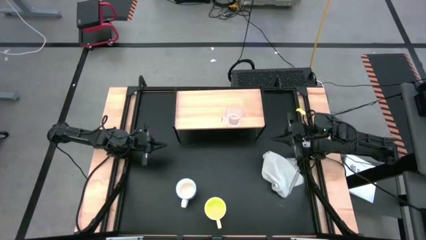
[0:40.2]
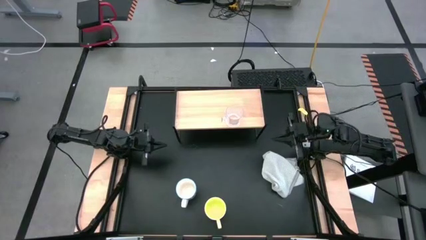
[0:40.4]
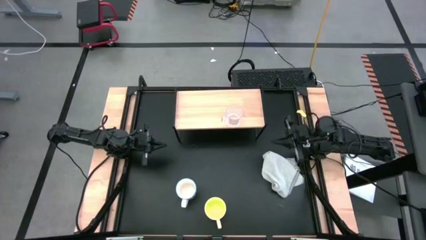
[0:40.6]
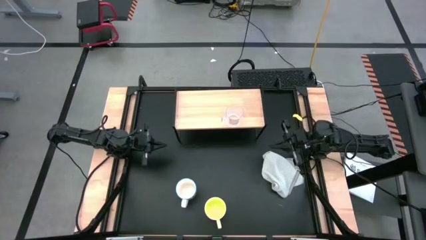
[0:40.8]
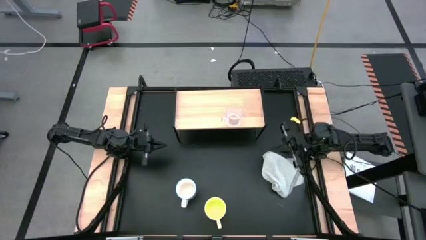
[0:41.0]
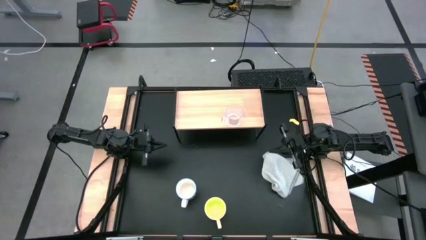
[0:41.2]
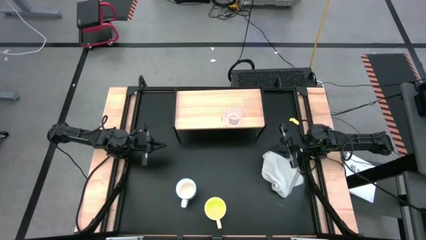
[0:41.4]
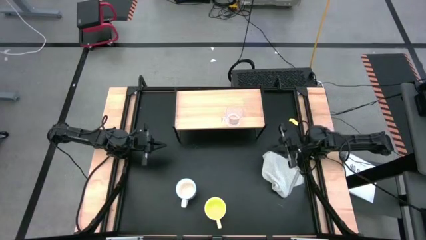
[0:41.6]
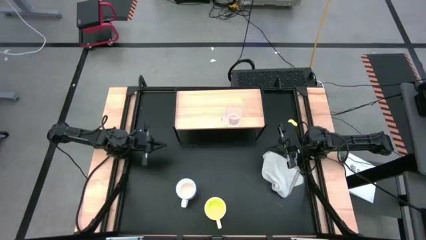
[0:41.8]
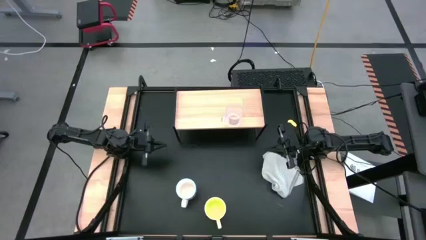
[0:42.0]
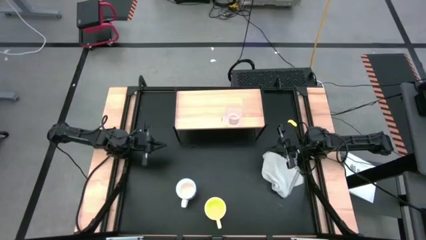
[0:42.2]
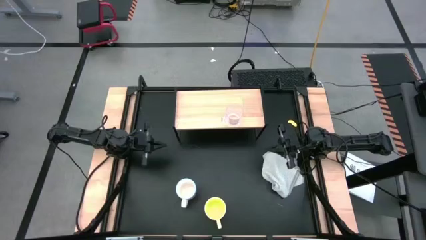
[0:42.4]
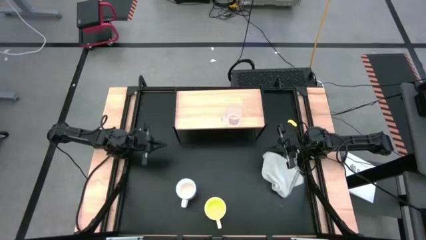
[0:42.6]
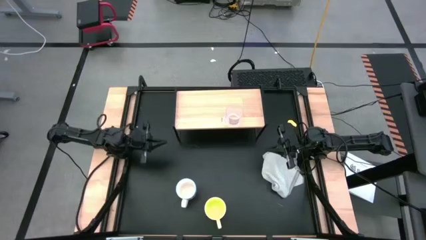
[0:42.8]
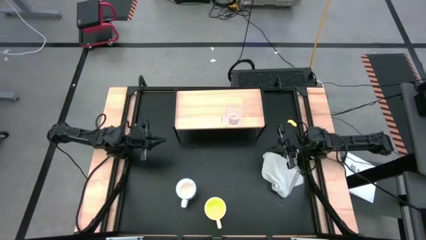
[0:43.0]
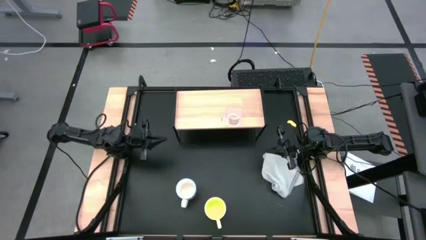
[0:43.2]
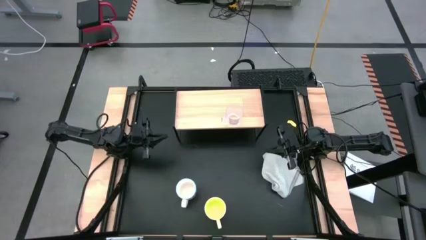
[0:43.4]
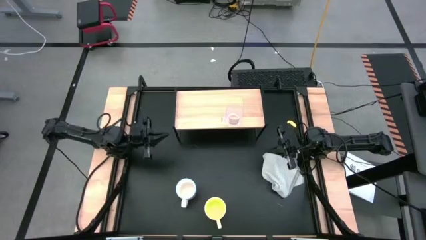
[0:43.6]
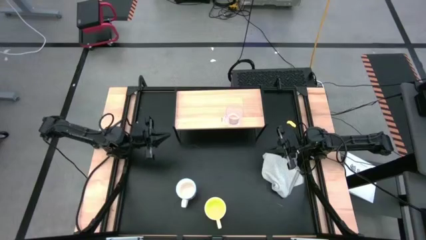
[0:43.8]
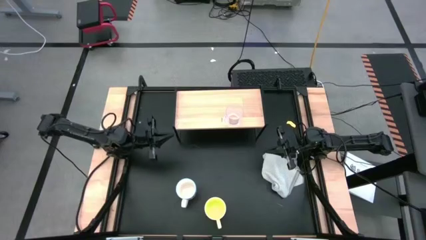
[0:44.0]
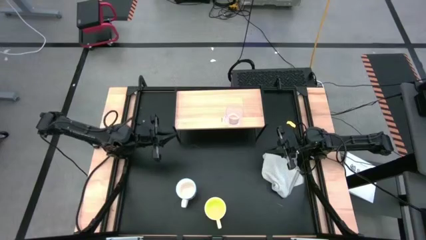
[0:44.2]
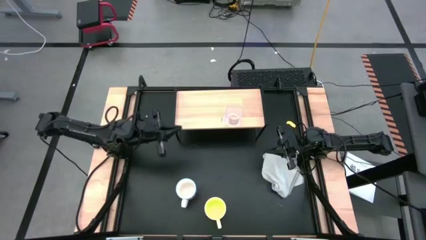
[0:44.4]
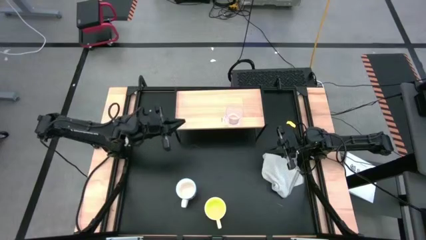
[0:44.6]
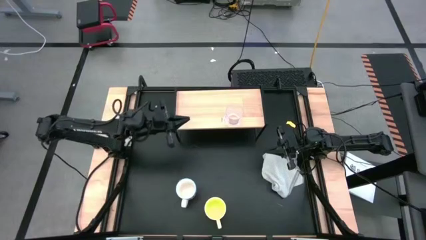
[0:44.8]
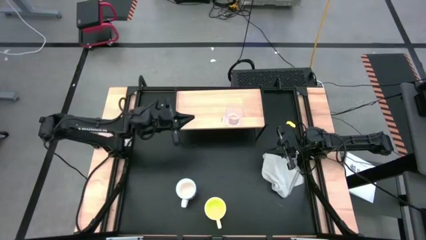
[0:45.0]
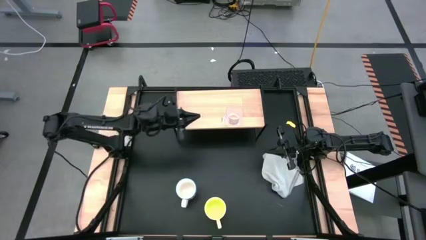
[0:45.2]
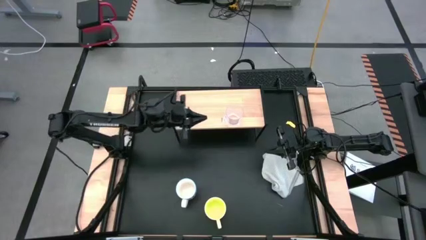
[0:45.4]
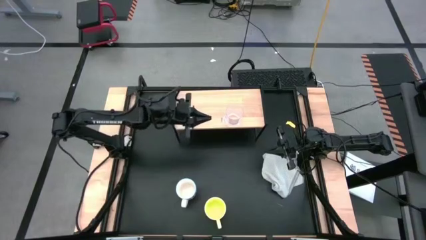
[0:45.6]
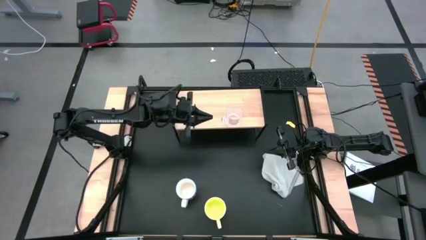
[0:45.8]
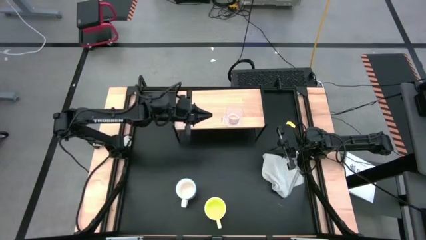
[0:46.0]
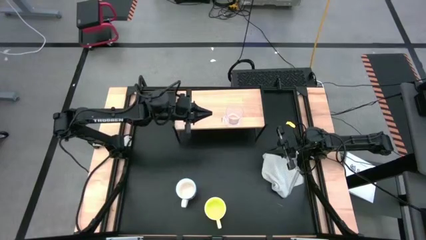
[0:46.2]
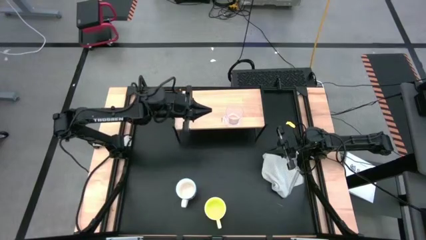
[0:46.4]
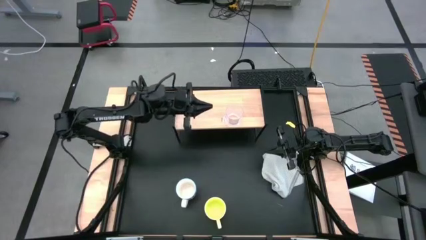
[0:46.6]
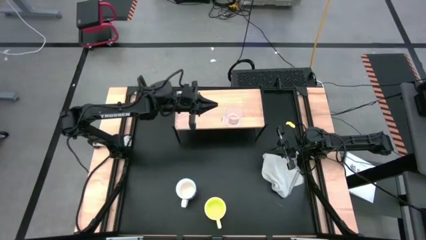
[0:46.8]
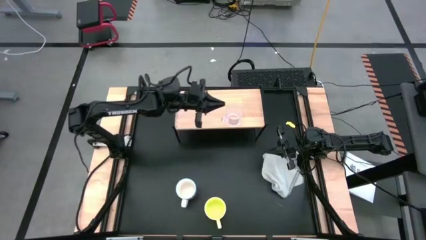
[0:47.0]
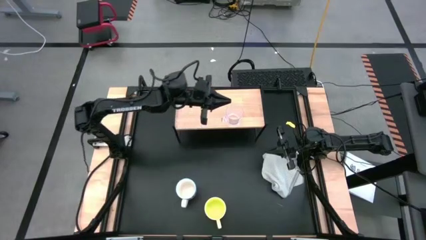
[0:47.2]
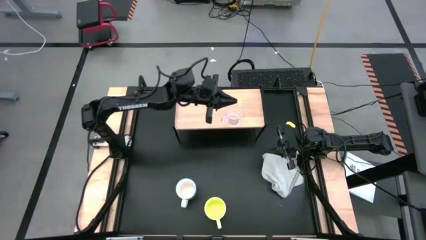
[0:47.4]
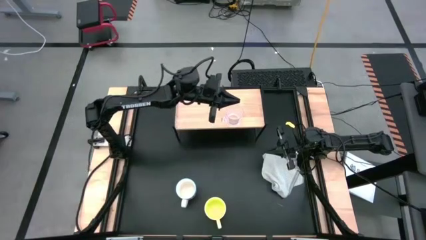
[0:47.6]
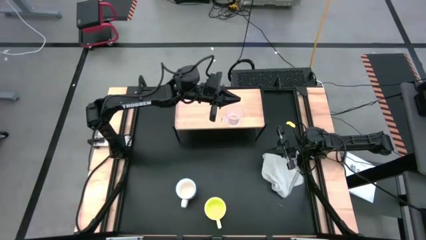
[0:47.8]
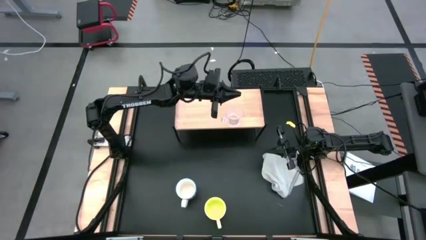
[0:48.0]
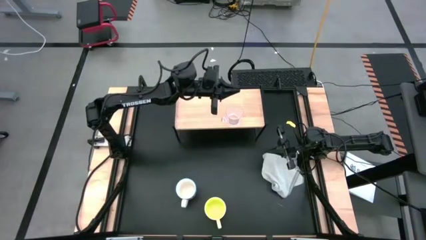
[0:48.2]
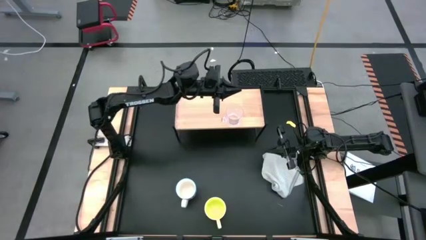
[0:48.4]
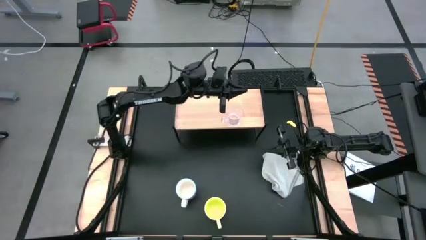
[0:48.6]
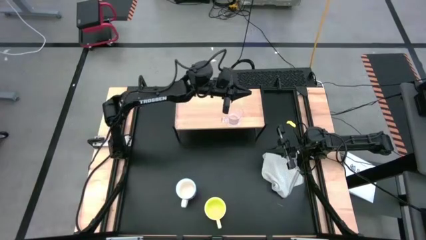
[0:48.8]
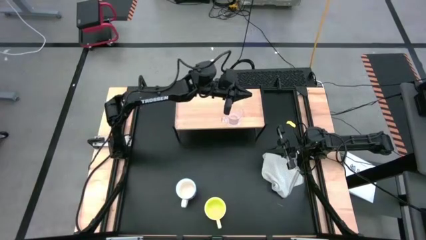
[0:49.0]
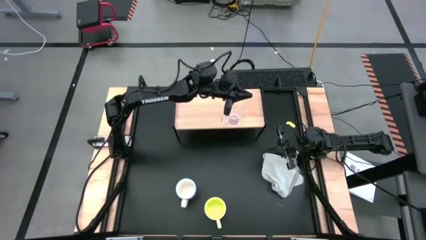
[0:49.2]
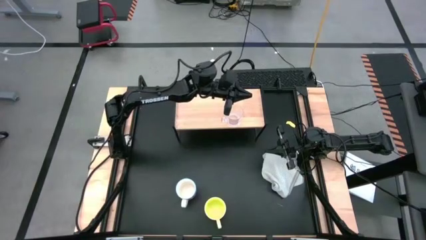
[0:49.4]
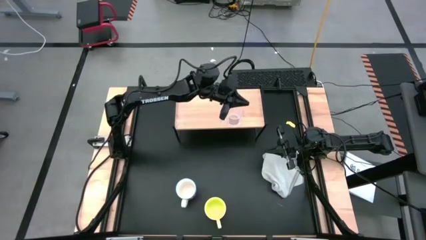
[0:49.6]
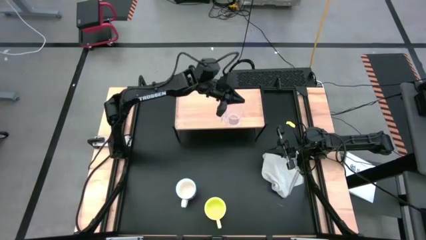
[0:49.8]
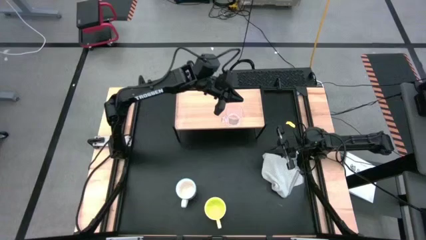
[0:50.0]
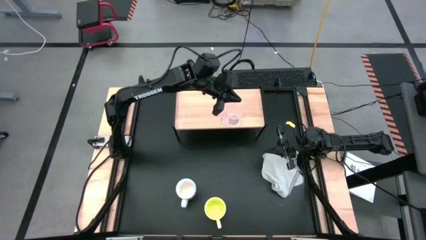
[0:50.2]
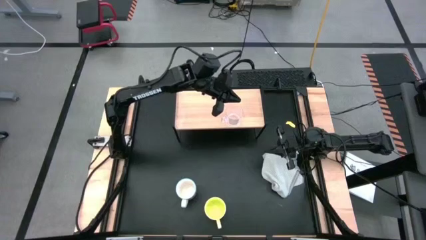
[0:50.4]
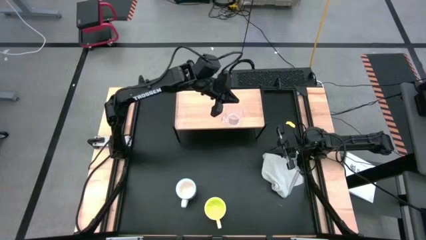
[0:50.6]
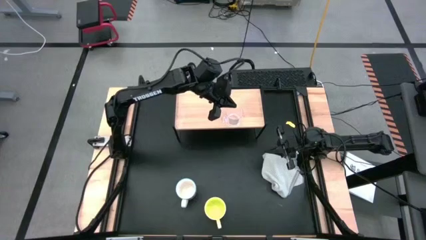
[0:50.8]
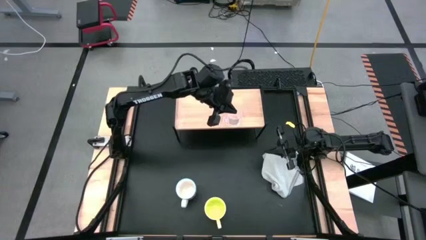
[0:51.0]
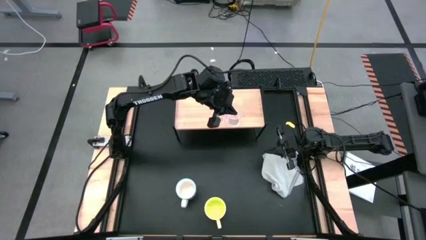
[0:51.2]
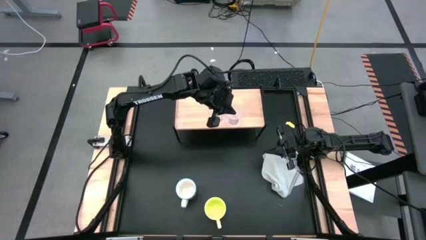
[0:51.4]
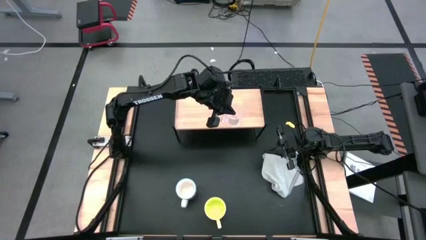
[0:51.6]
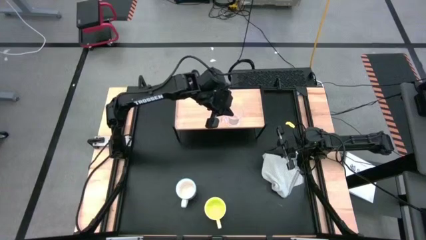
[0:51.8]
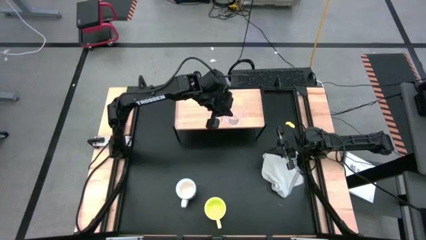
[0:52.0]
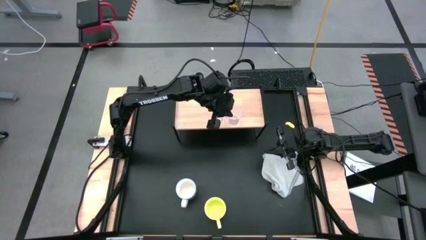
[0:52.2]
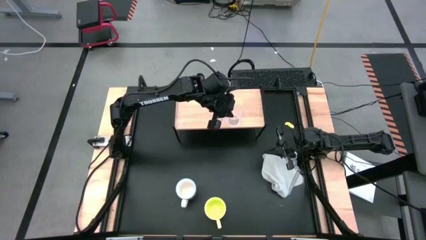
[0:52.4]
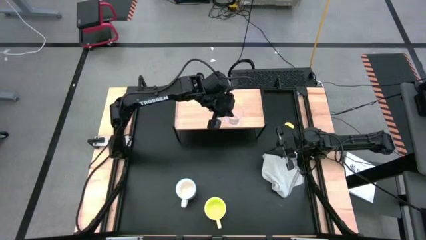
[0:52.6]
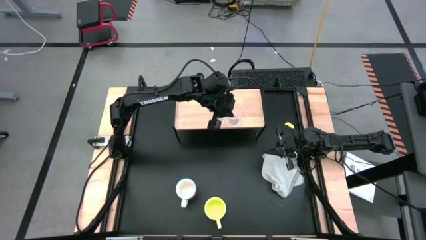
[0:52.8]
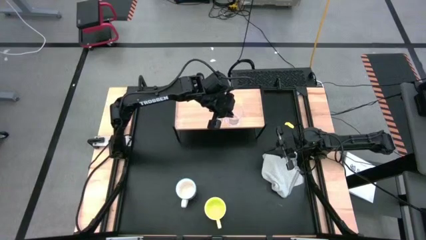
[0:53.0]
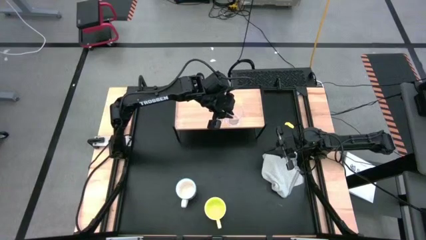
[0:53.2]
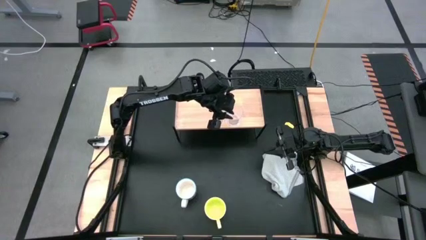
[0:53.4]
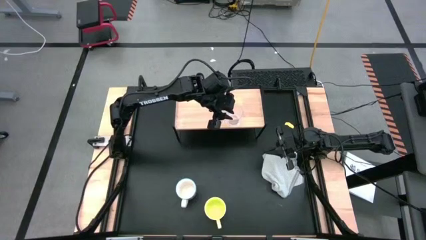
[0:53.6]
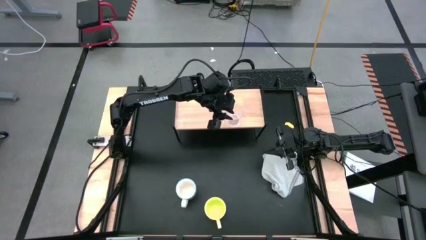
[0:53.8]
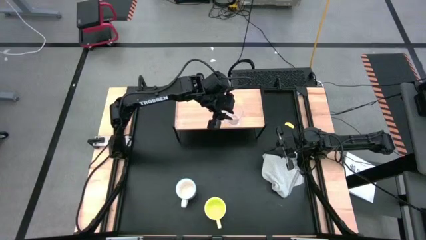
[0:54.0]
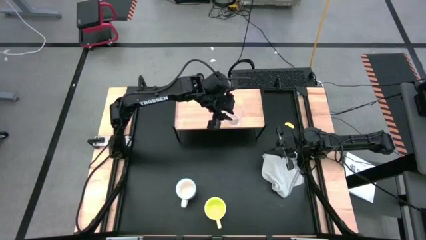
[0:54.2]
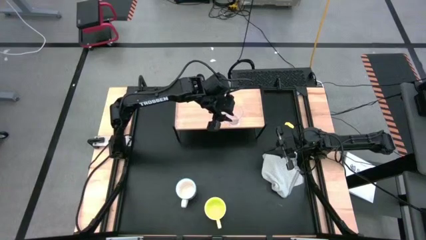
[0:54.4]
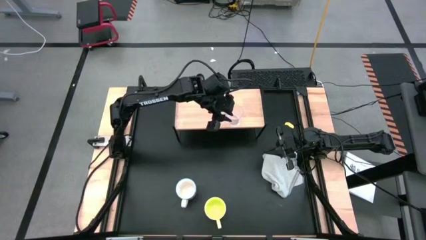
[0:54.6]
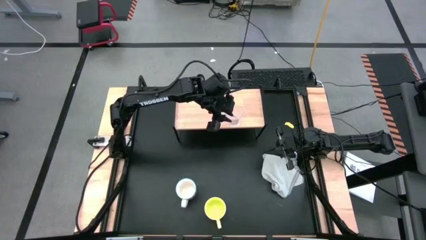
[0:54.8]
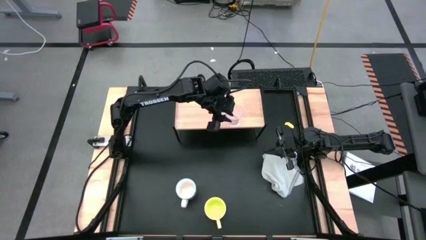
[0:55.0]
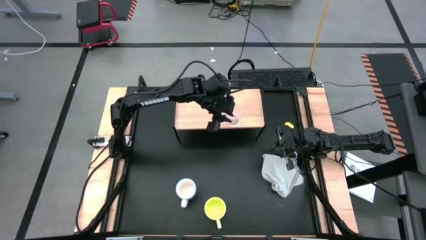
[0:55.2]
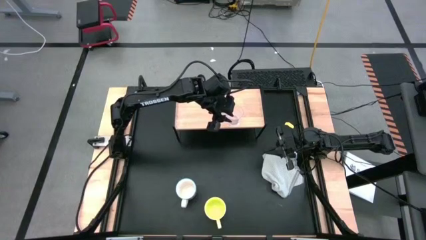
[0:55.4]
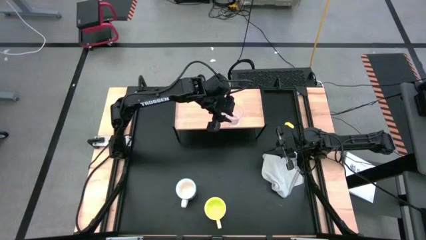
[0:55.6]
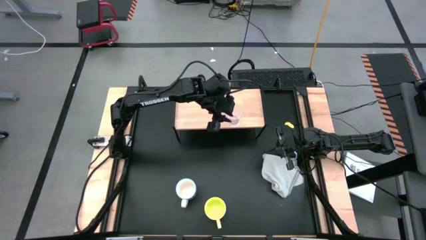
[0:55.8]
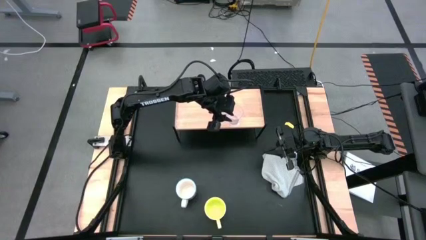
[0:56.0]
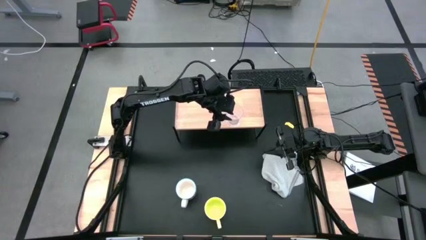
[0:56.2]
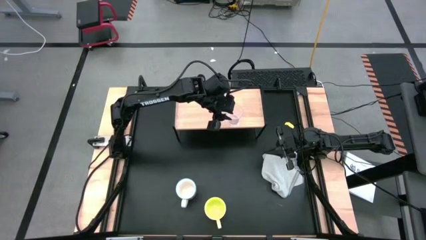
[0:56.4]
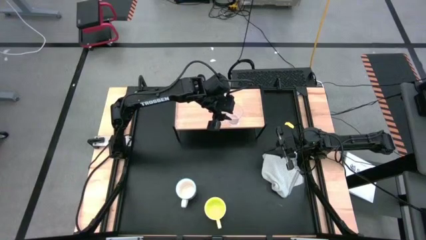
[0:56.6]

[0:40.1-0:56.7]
Task: Stack small to large cups/mugs on shelf
Put the transparent mug on the shelf
